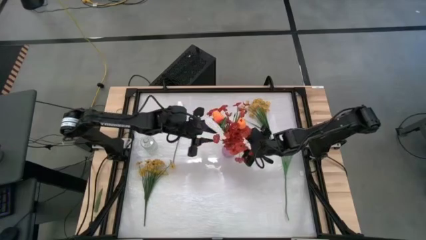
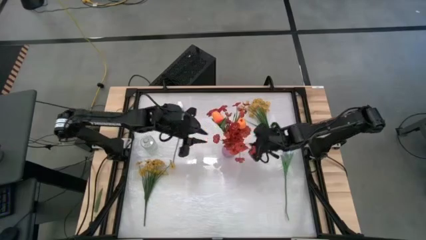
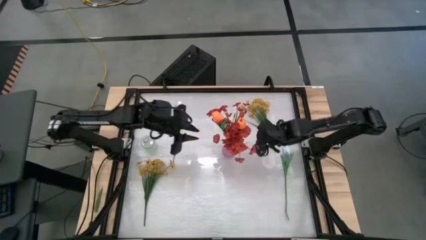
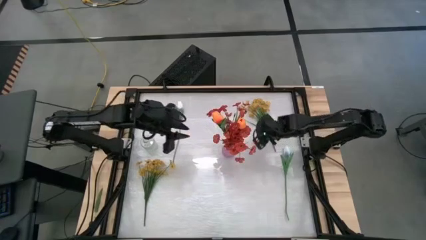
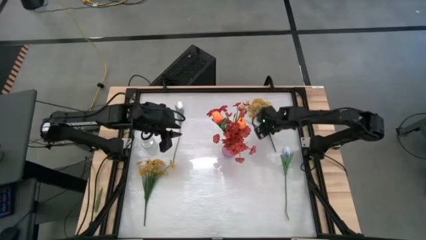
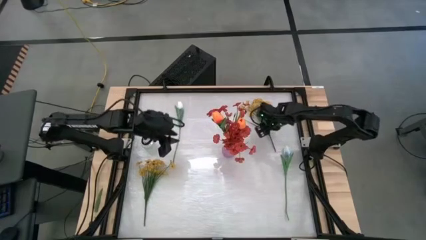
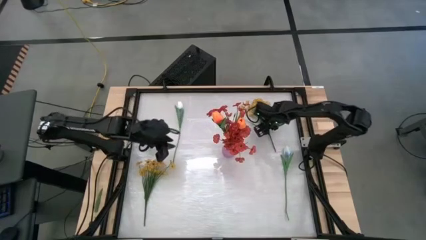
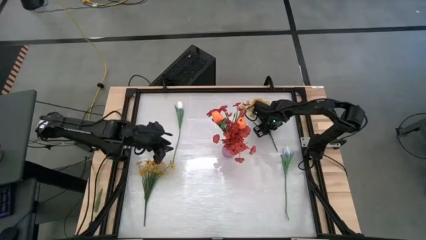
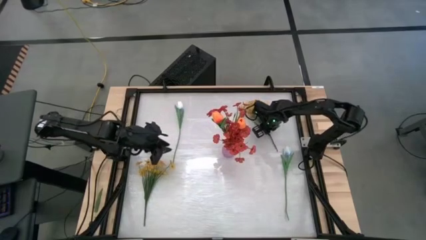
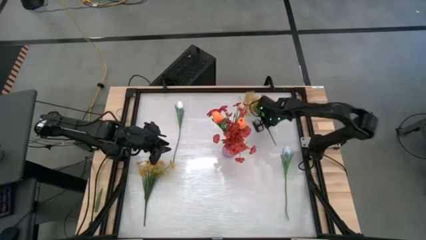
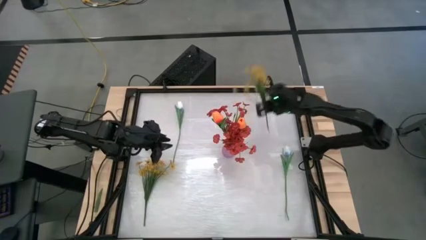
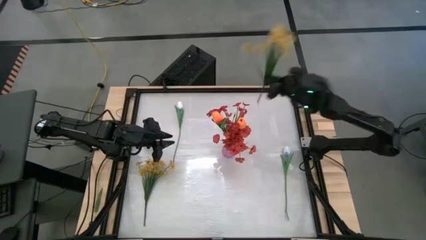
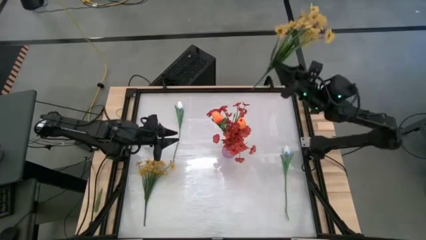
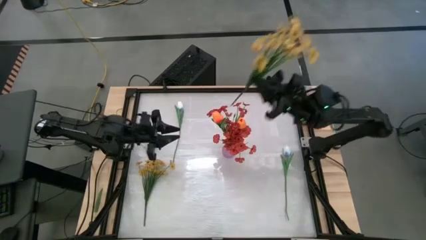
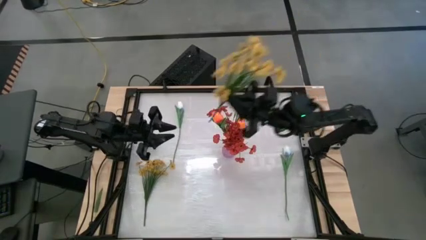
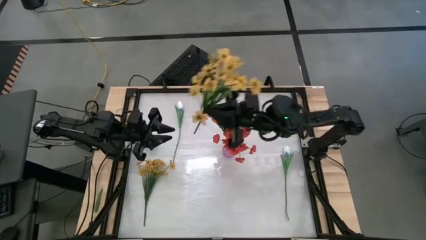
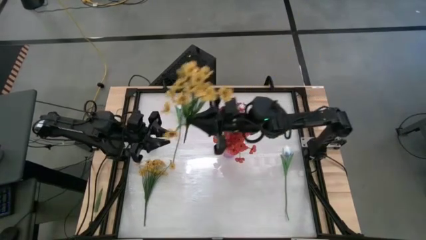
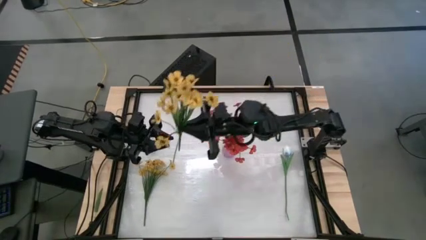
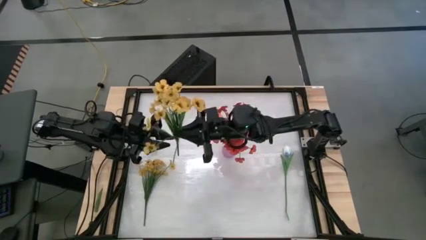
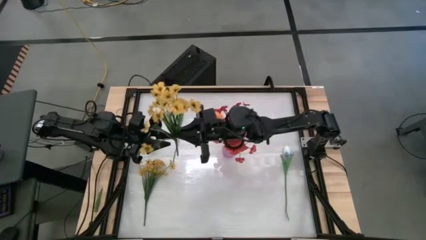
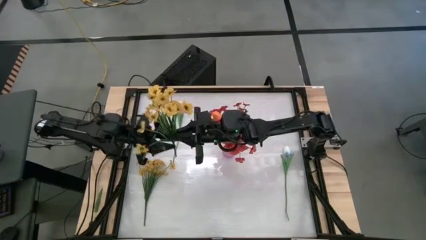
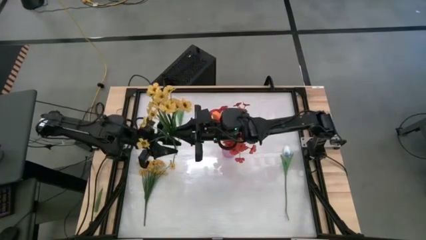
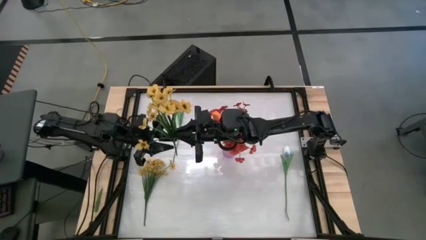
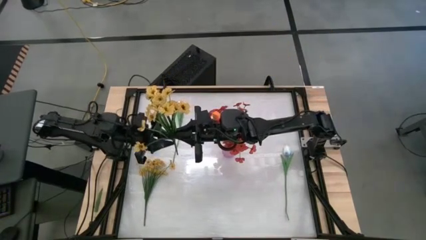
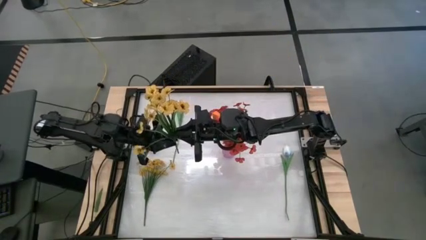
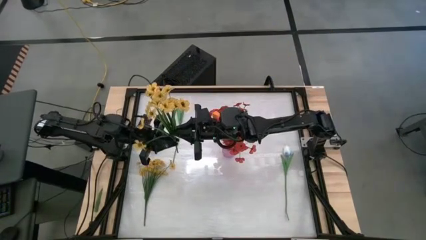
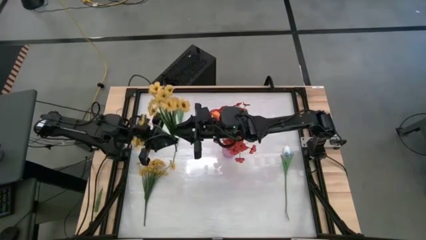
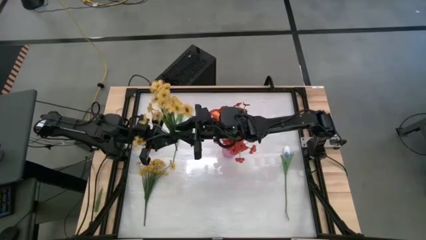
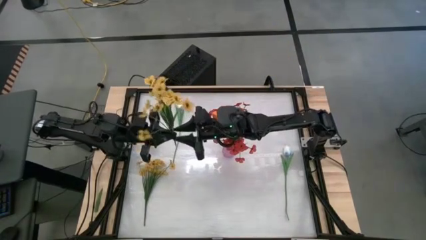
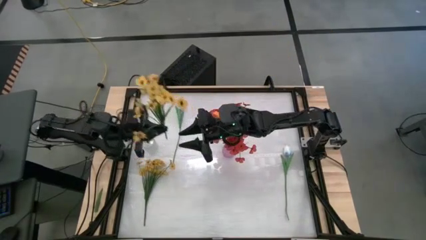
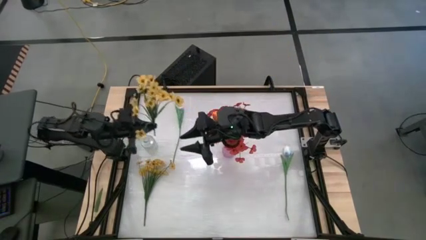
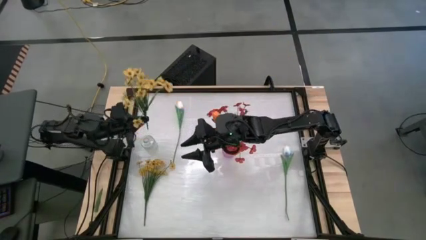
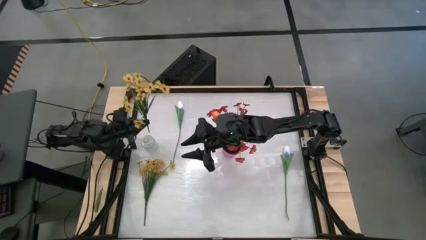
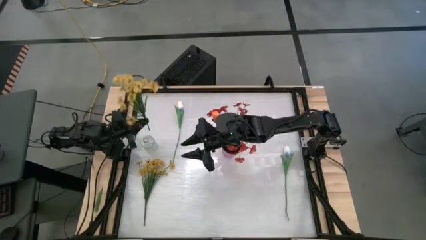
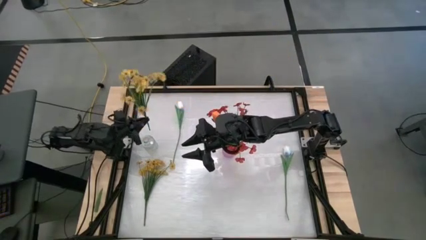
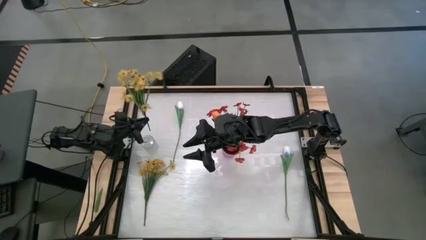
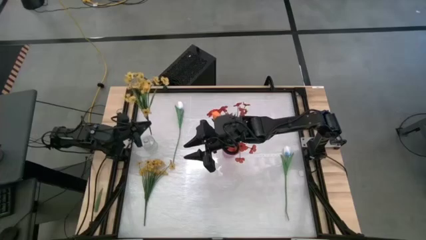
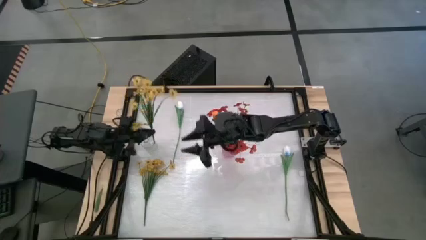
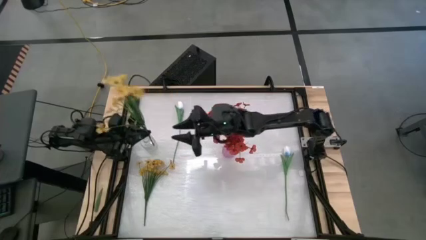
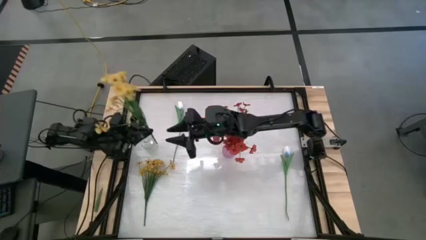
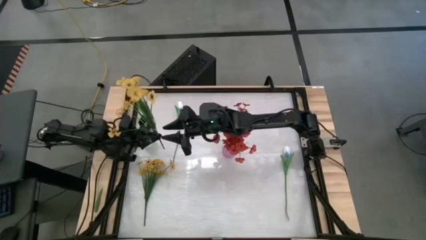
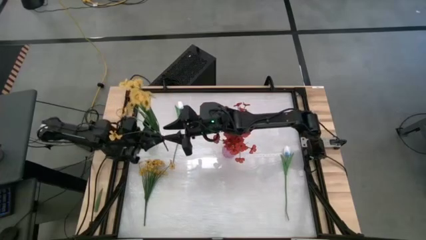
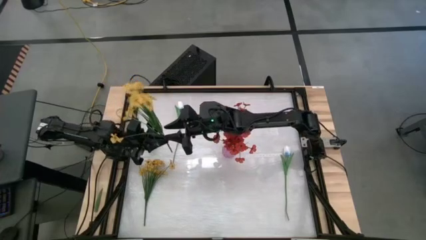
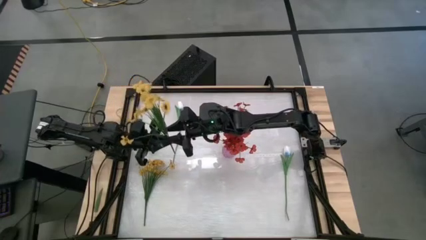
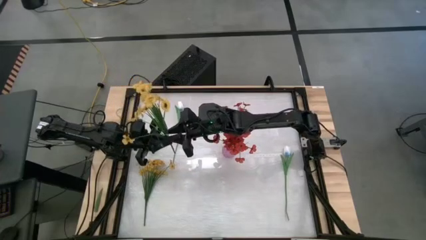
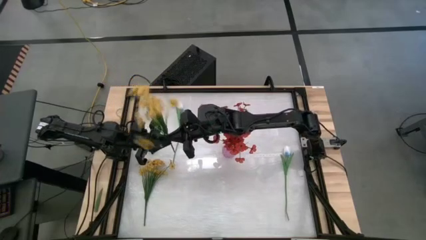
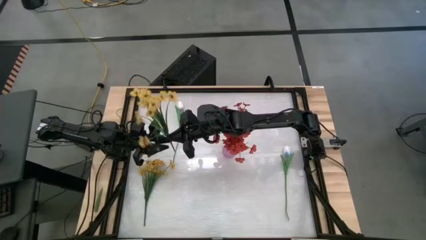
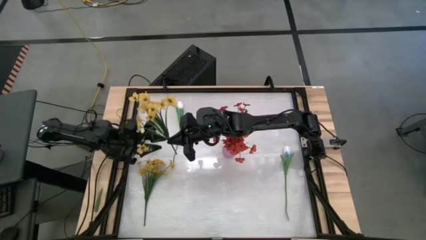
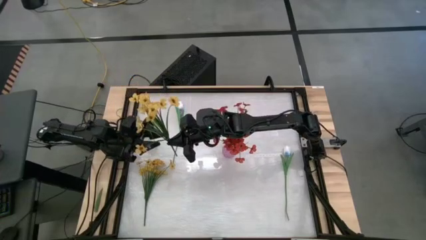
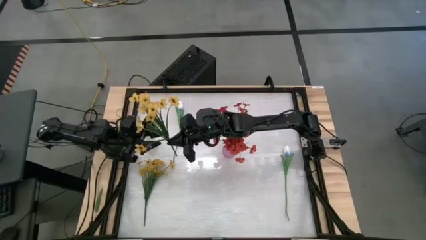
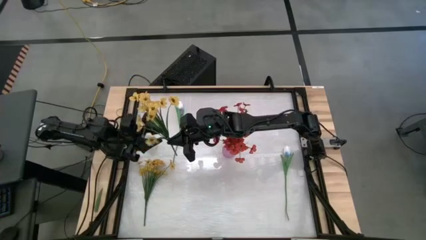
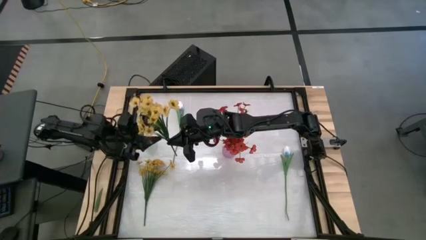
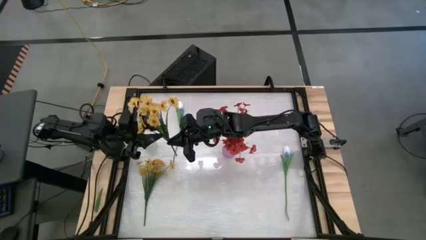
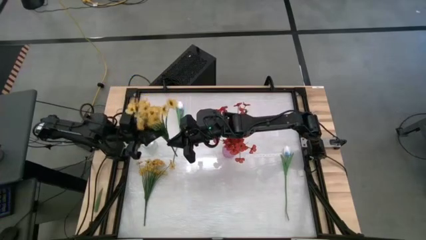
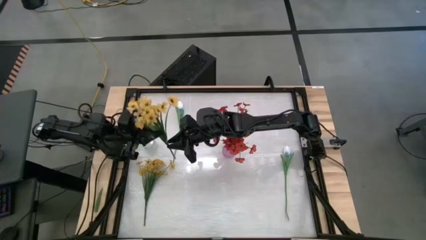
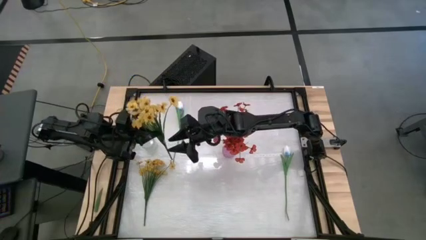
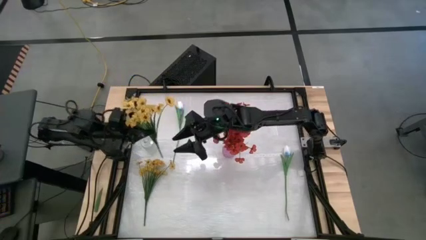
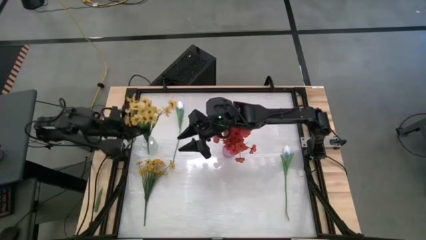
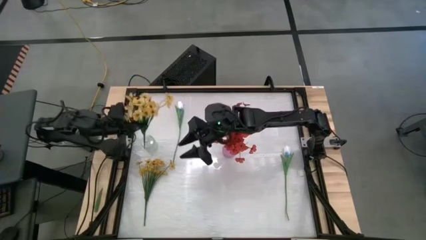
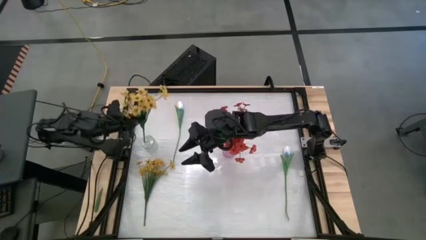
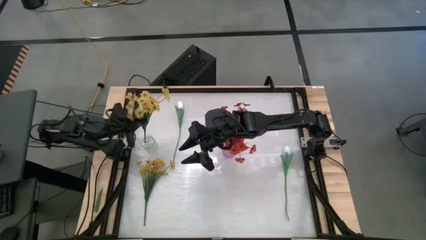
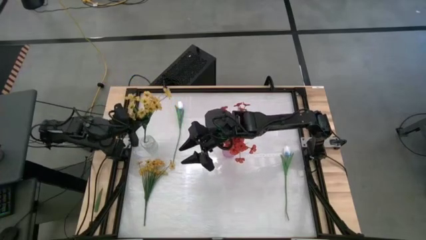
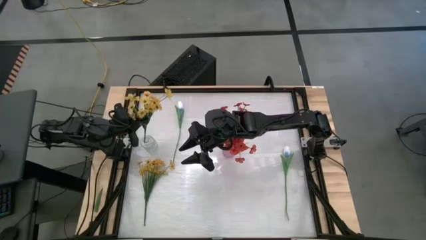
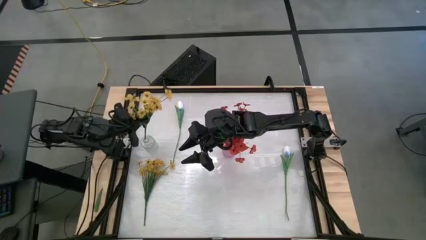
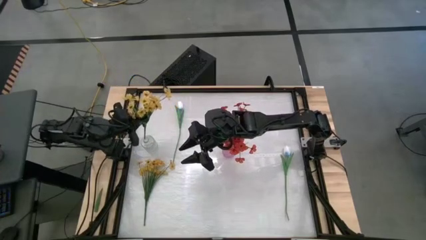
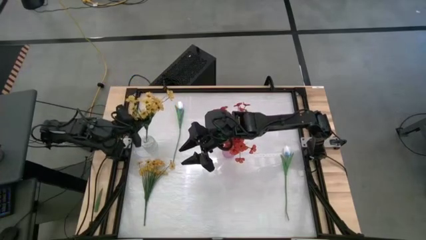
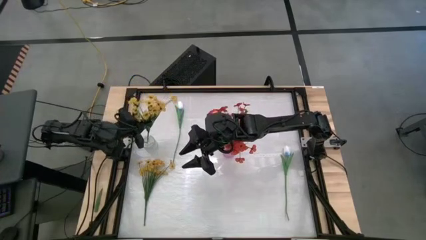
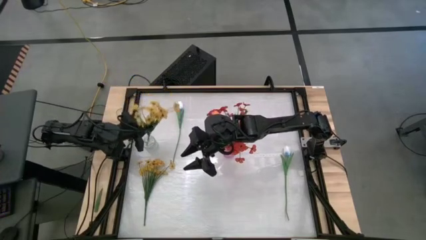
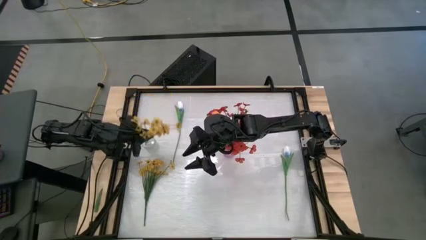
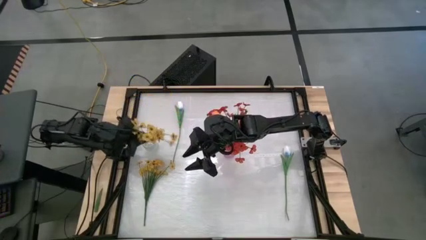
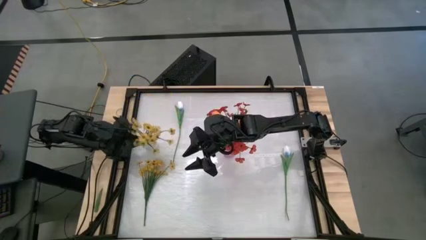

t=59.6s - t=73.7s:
Task: Sort flowers into vase by color
Put the top yellow flowers into the transparent vase
